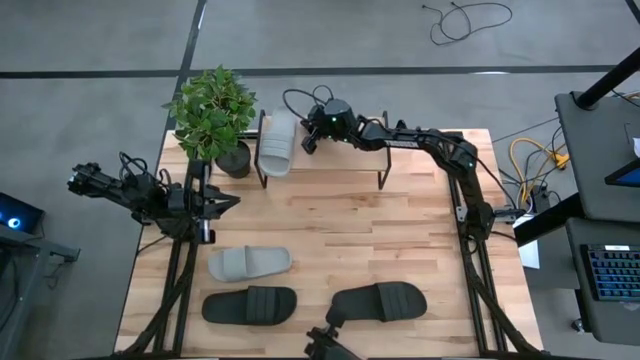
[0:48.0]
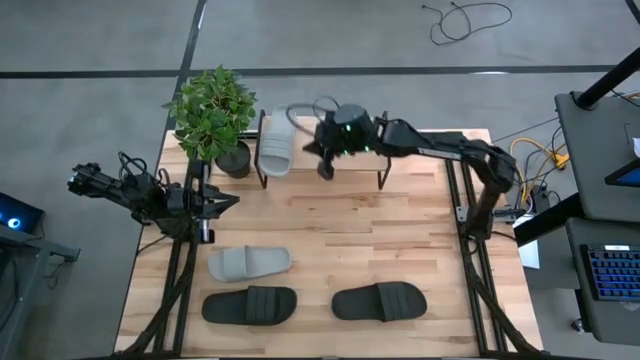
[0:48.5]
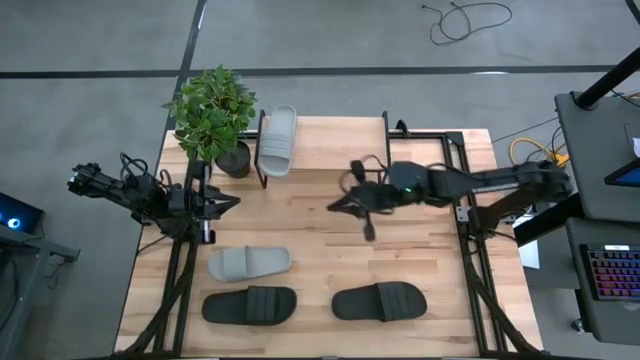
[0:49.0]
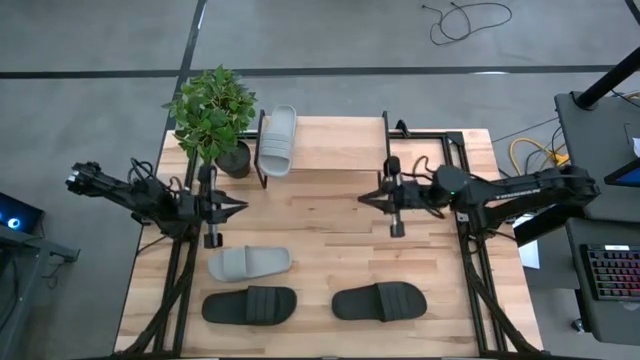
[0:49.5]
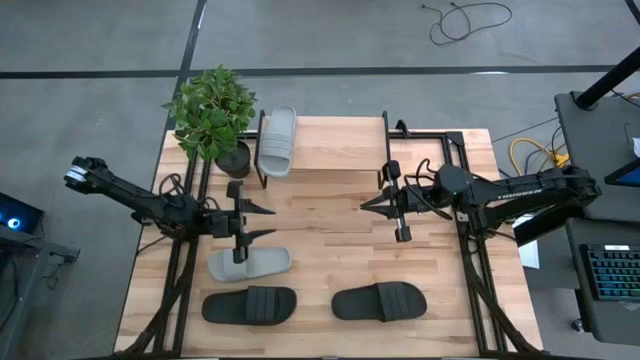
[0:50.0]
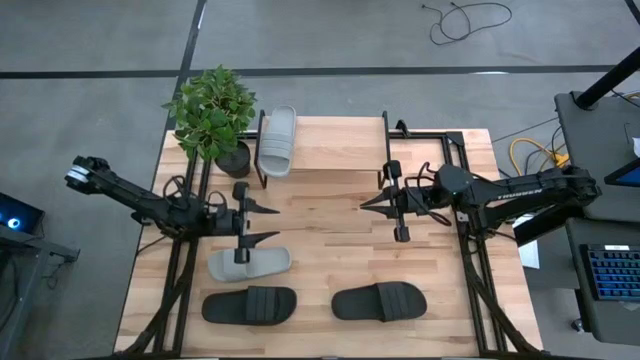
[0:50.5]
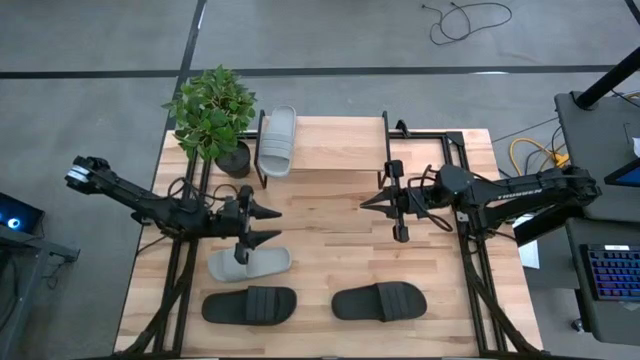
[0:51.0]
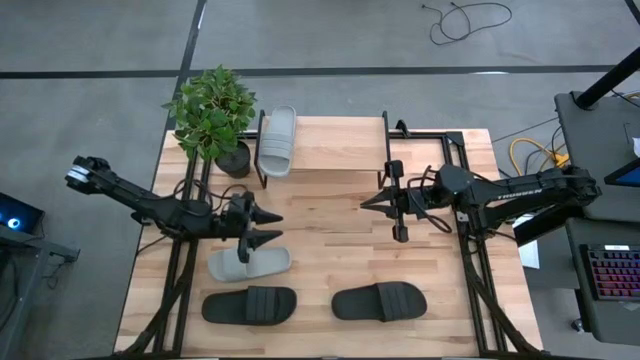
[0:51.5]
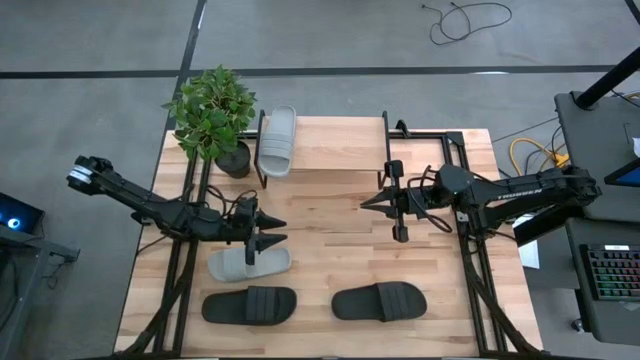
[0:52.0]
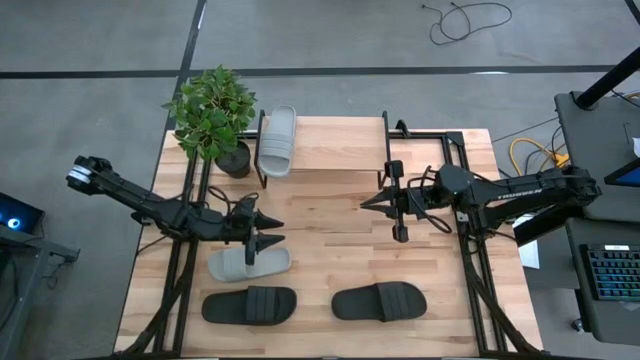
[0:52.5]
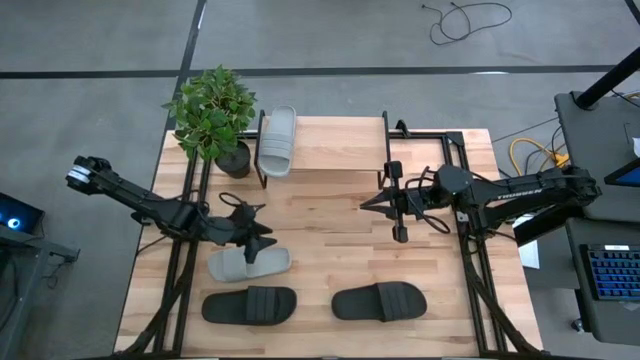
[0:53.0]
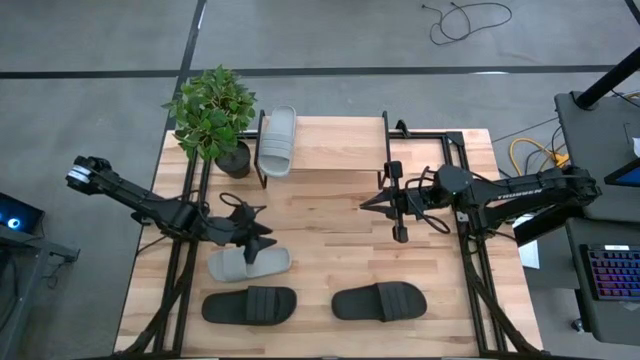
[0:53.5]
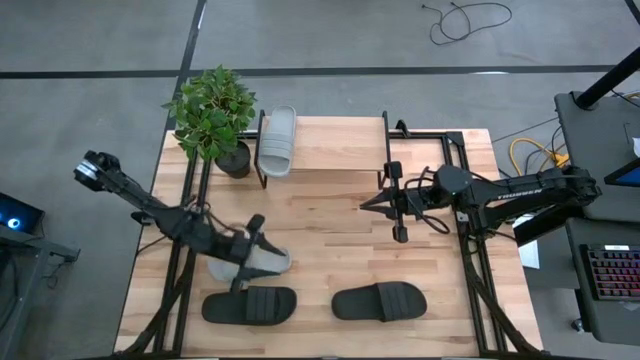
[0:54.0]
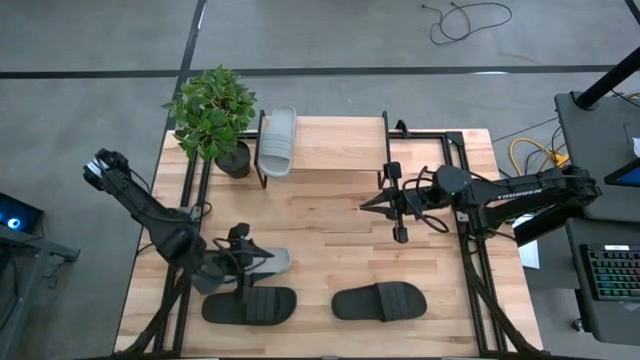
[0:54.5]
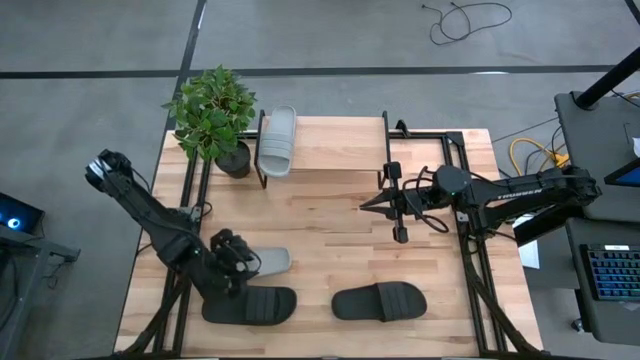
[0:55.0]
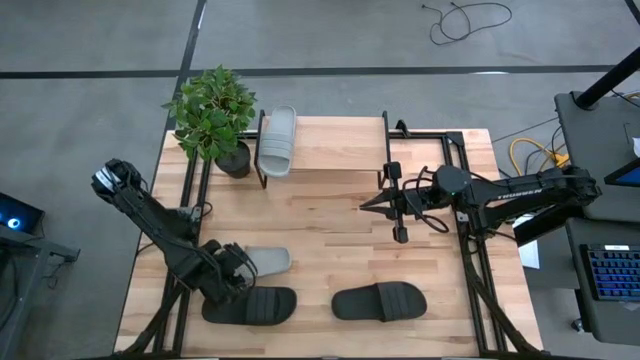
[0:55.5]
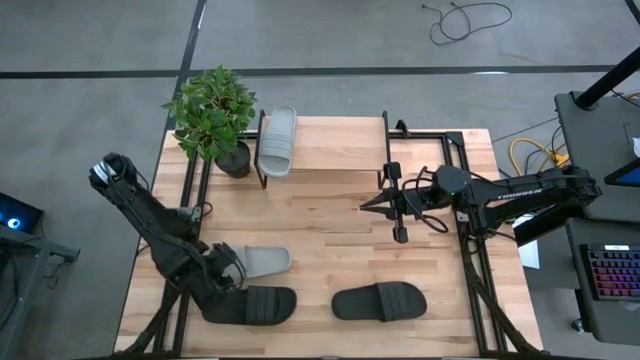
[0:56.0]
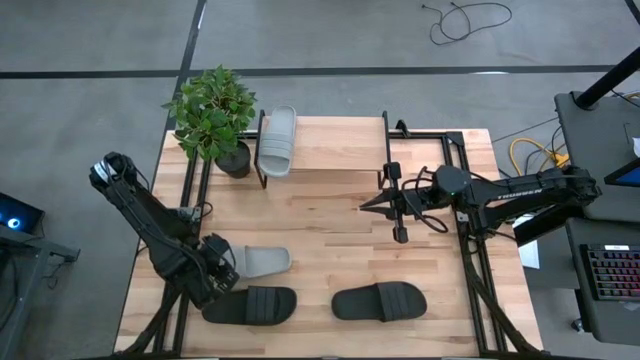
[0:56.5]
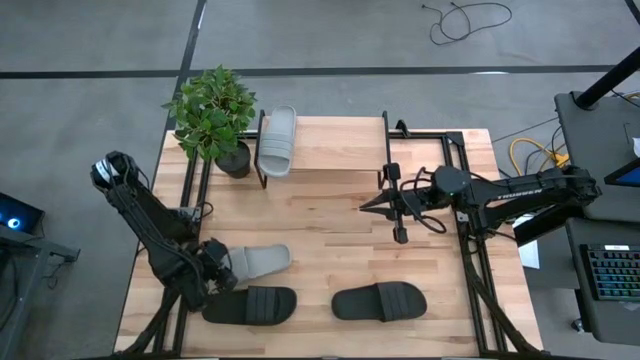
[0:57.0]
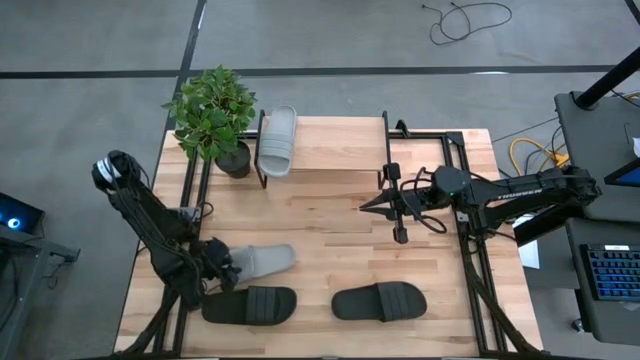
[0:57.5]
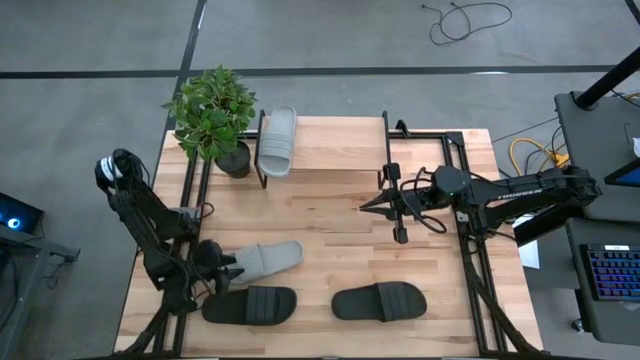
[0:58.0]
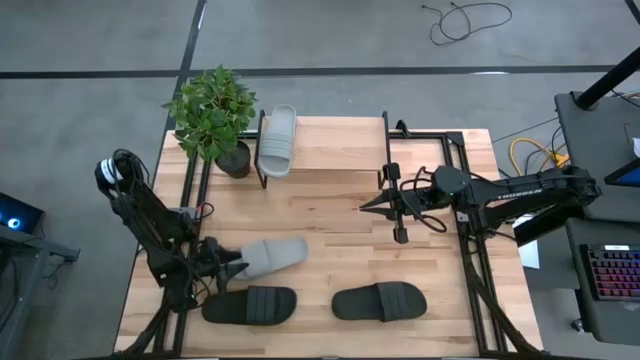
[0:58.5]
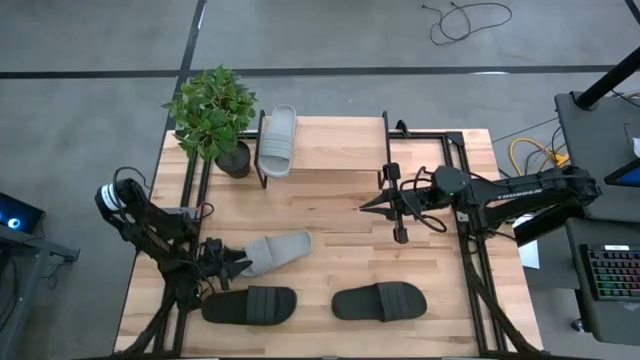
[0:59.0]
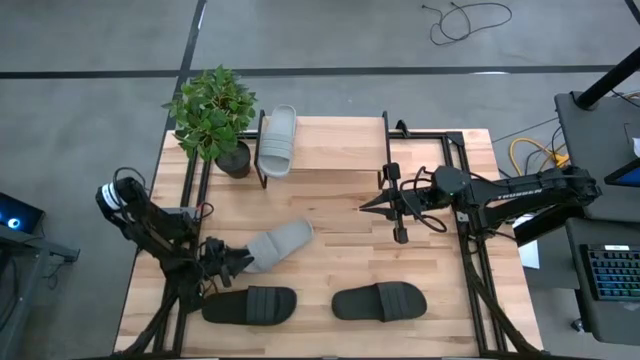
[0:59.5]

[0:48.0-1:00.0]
Task: Pick and place slides into the shelf
Put the grey slipper on the shelf

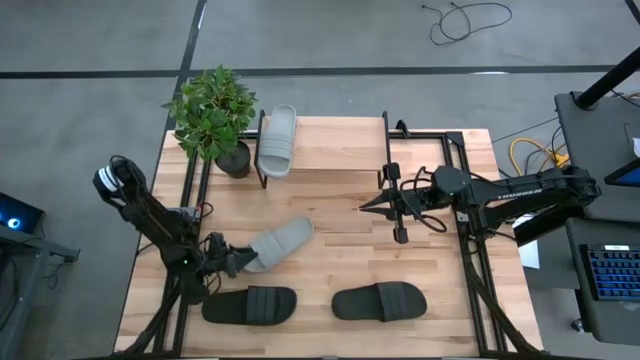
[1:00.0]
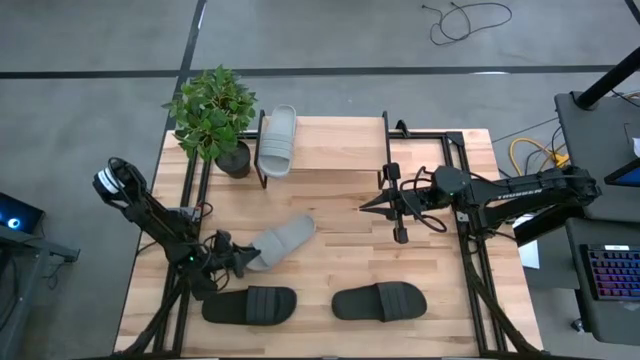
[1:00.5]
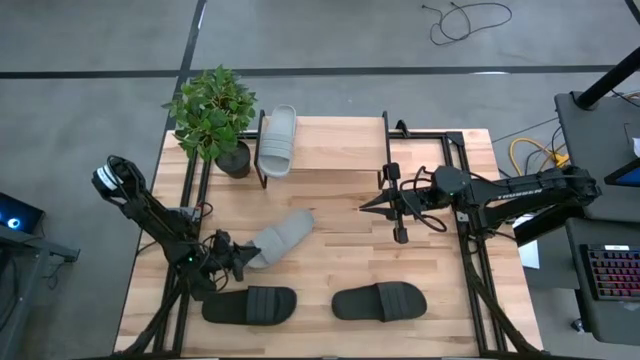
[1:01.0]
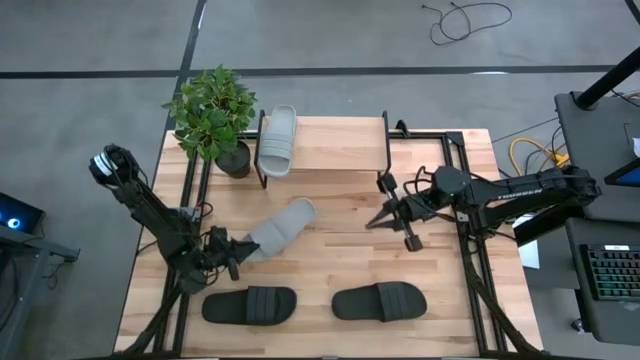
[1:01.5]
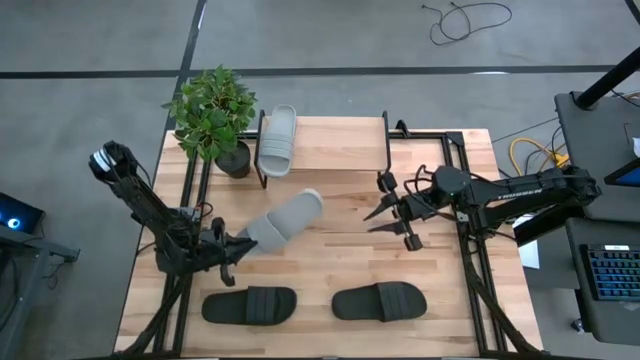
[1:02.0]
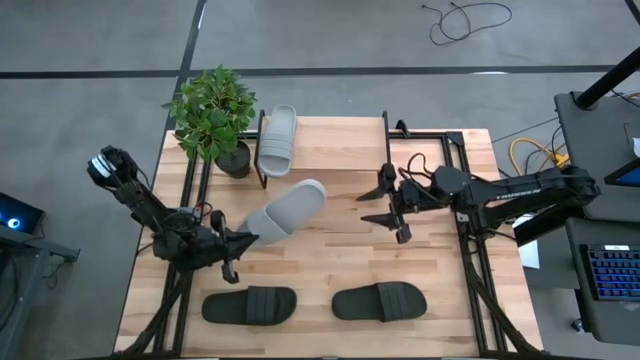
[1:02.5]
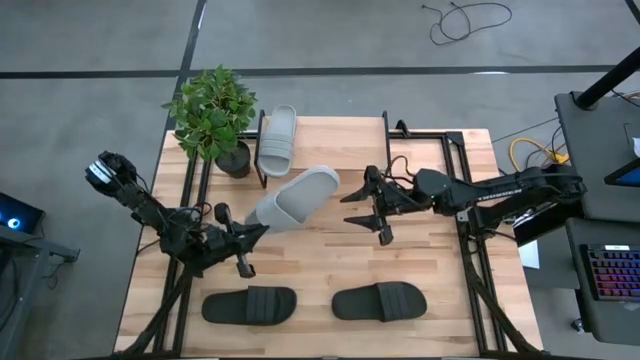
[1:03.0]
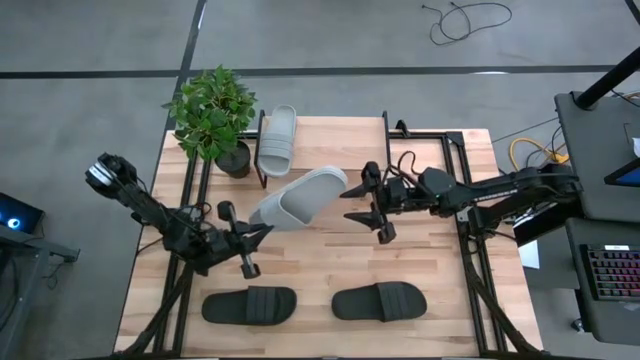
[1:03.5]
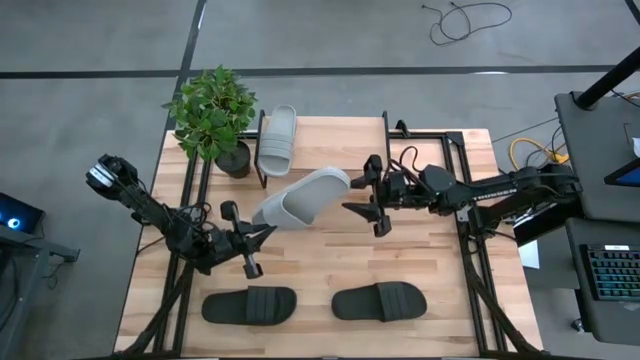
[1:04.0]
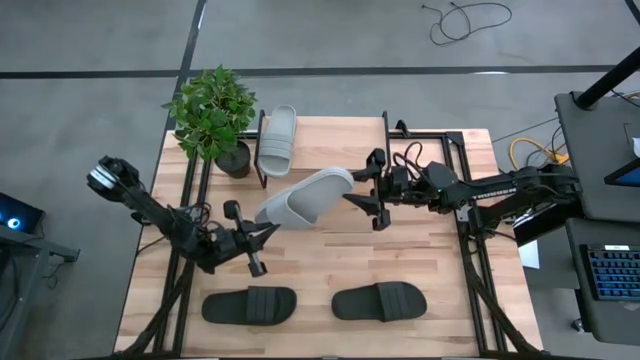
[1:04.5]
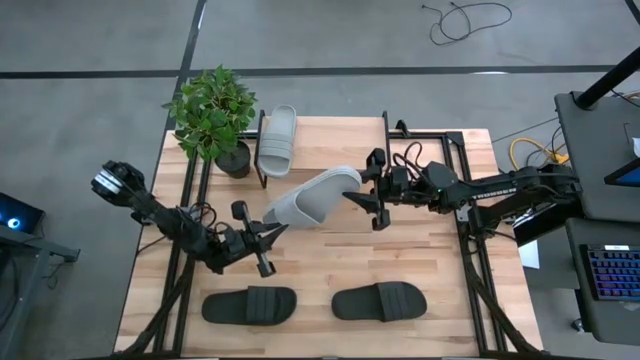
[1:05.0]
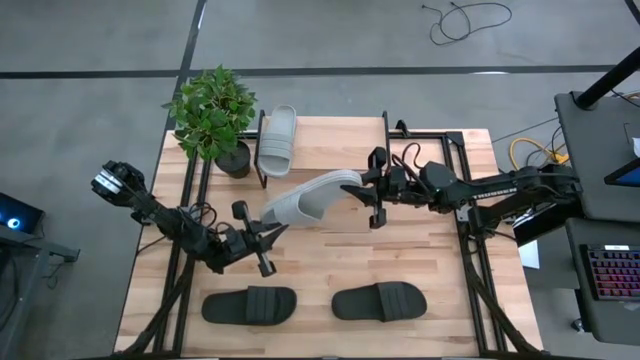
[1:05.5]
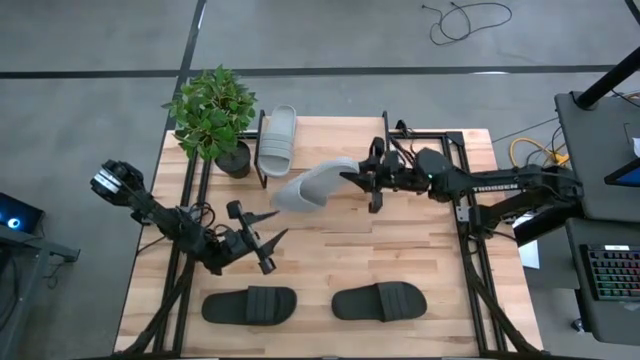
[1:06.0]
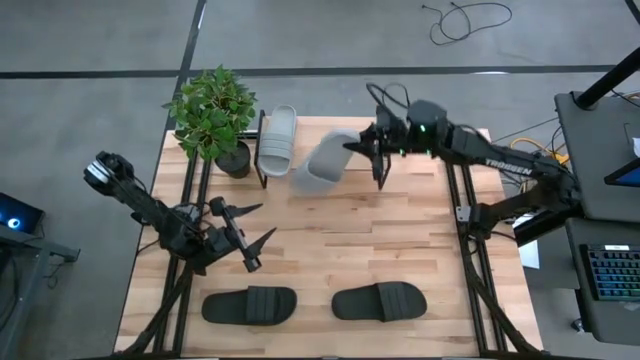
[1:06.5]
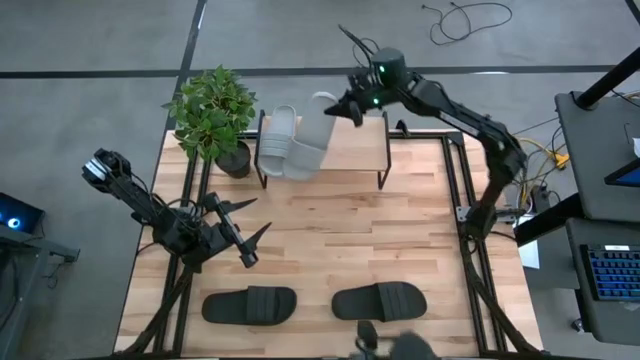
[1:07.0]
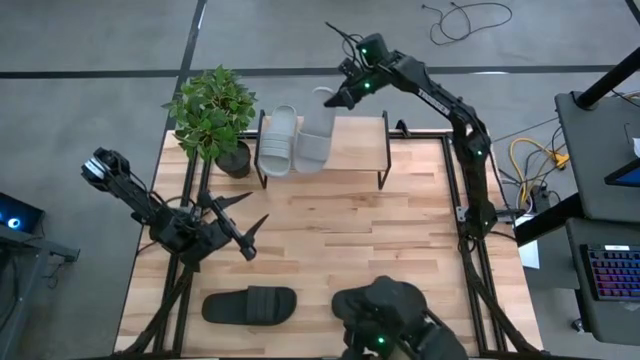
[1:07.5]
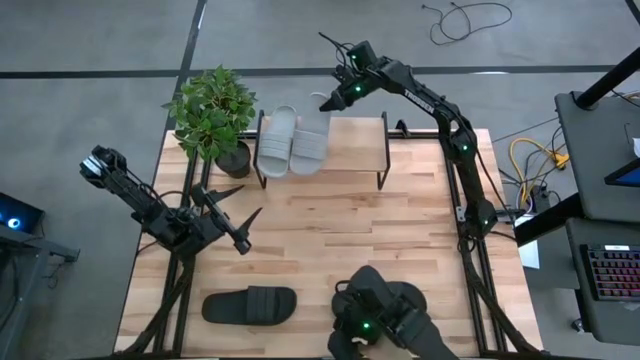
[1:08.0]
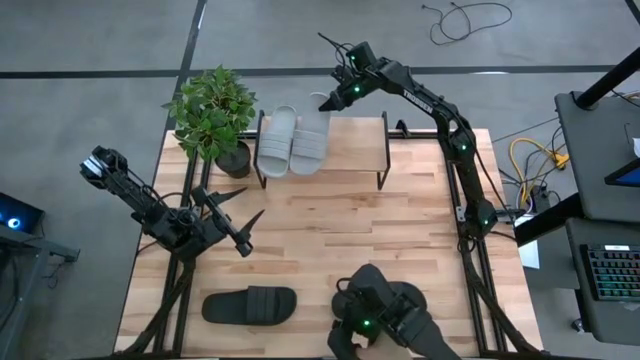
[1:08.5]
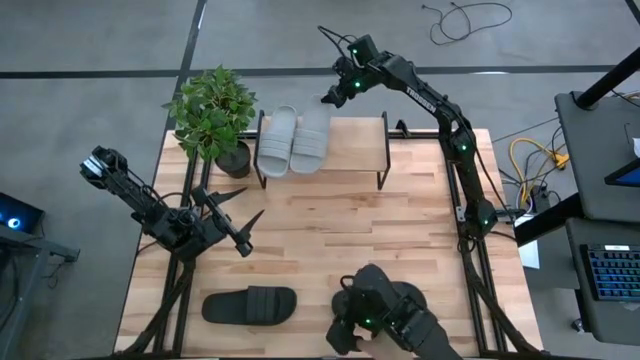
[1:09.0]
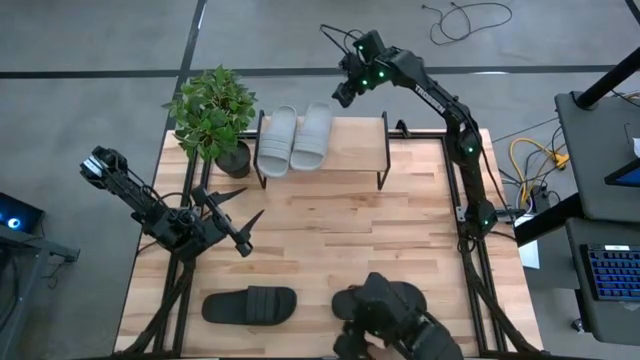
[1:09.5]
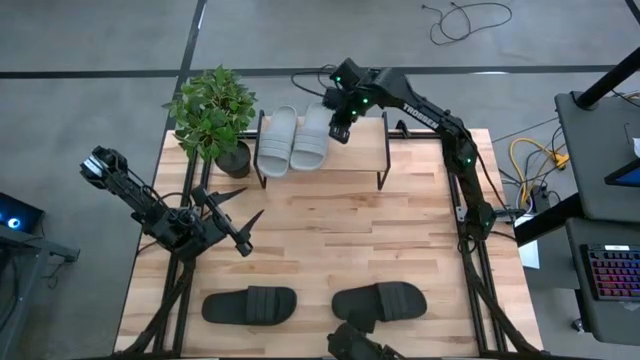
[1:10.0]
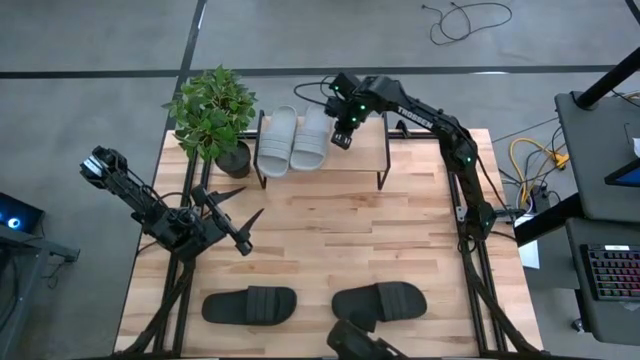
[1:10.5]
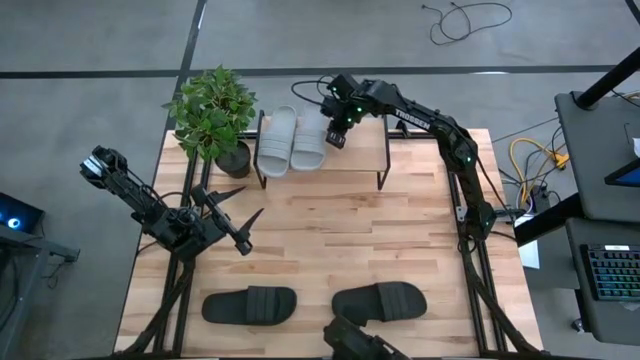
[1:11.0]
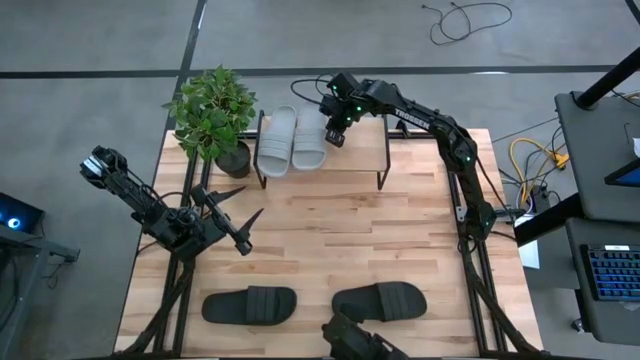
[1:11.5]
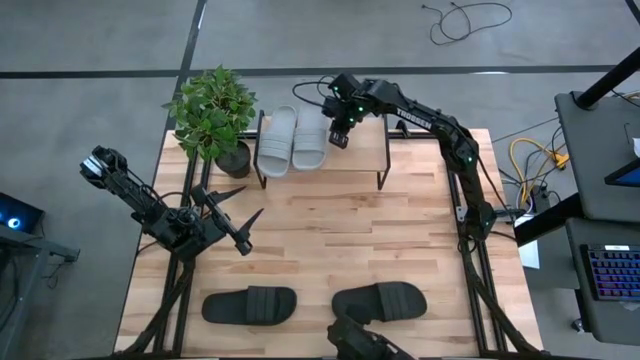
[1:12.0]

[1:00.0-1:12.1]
Put the grey slipper on the shelf
